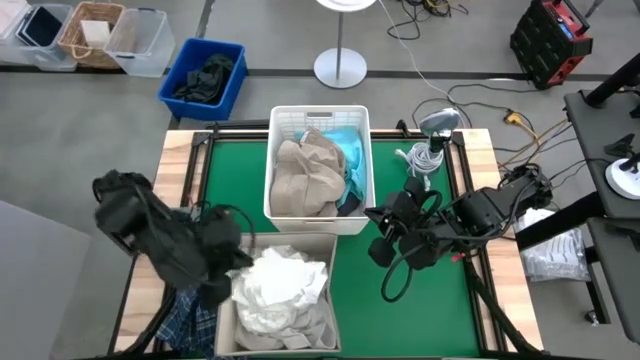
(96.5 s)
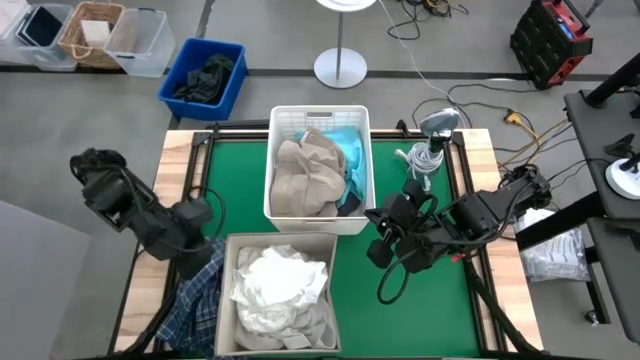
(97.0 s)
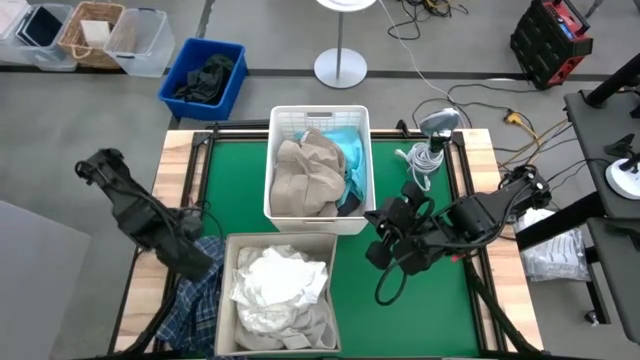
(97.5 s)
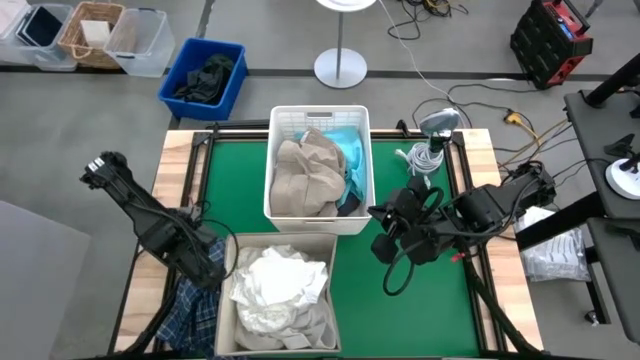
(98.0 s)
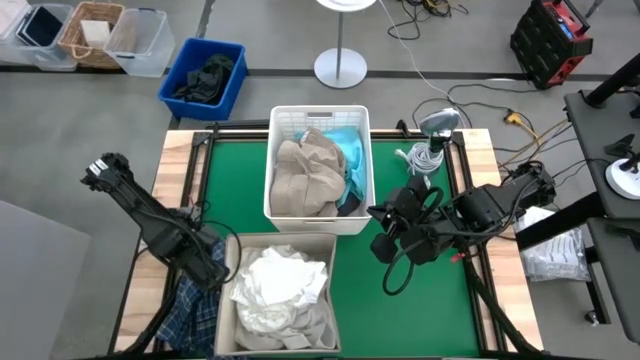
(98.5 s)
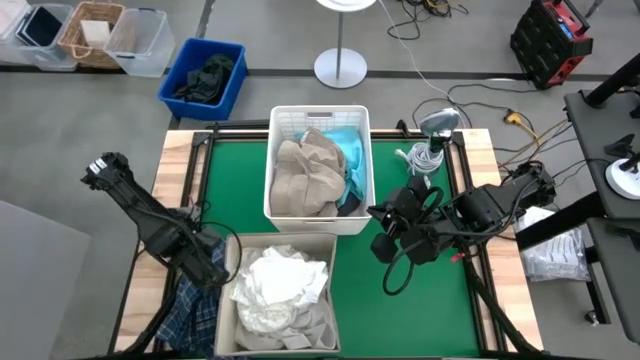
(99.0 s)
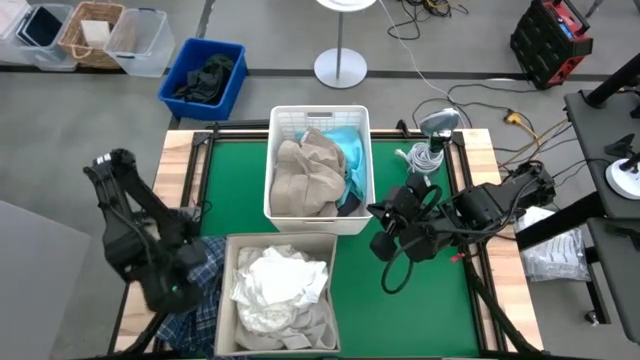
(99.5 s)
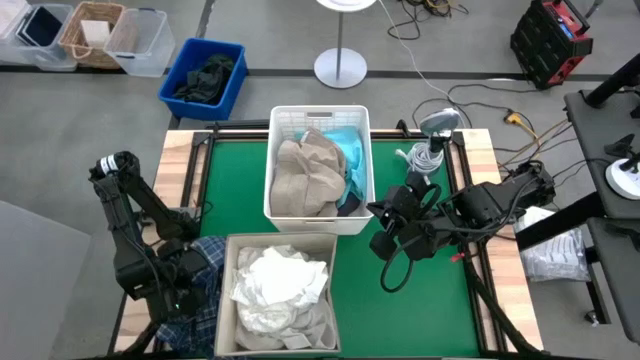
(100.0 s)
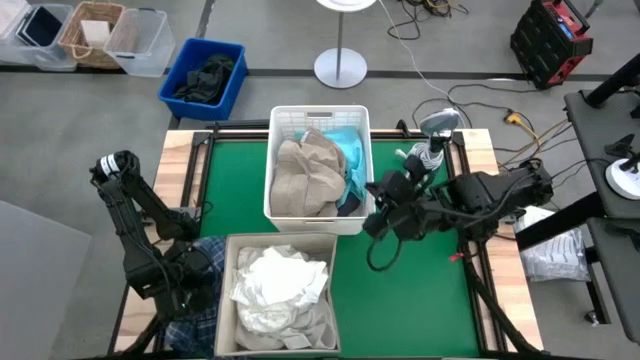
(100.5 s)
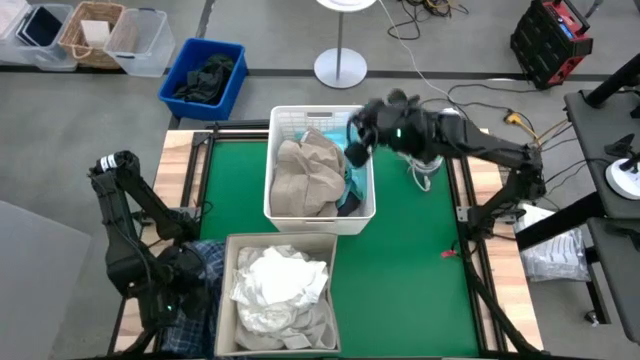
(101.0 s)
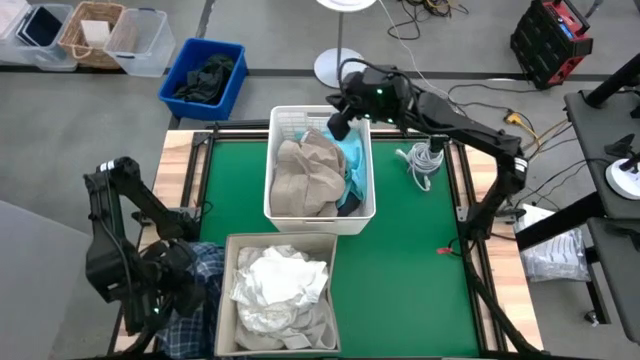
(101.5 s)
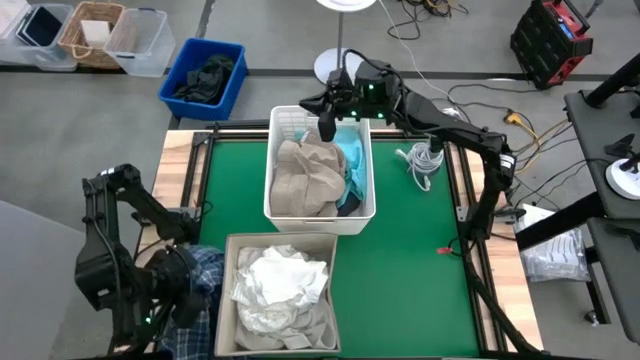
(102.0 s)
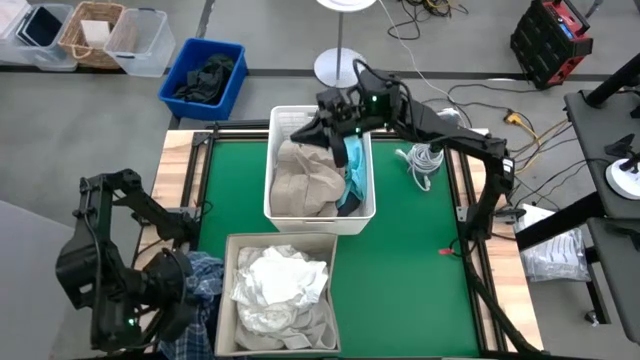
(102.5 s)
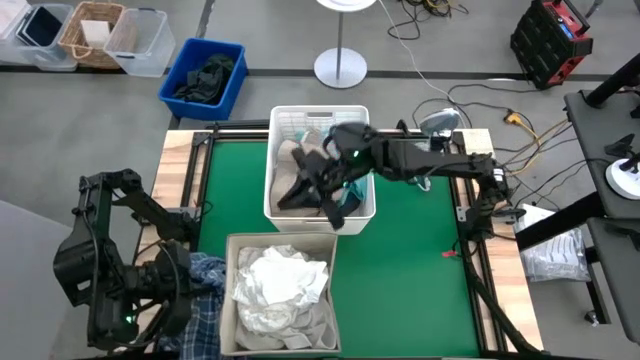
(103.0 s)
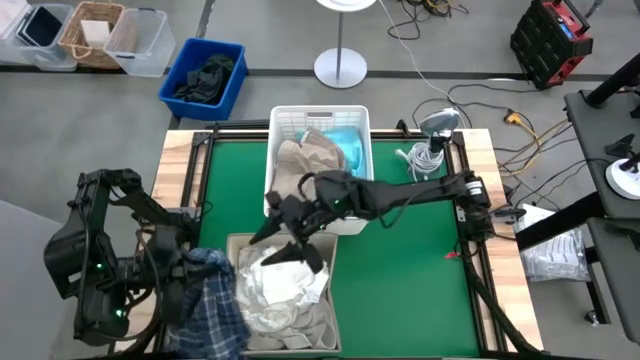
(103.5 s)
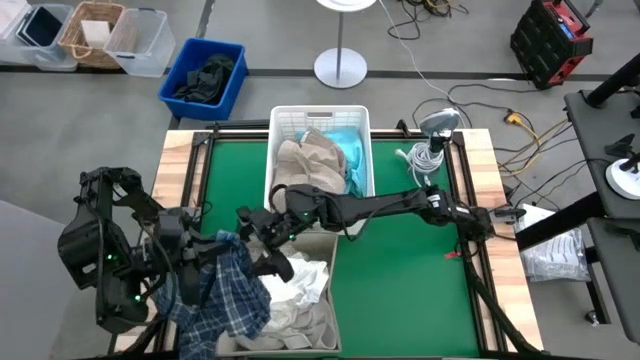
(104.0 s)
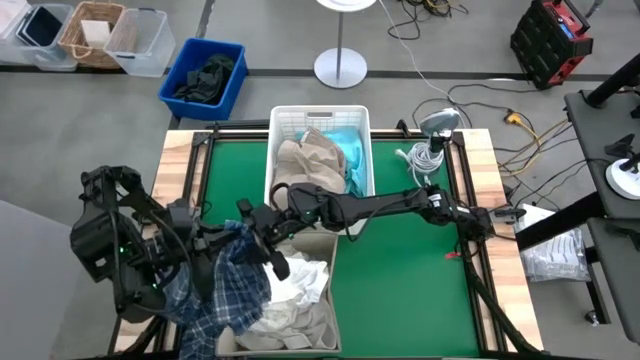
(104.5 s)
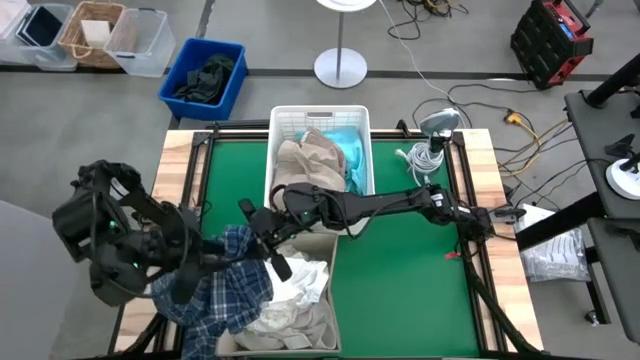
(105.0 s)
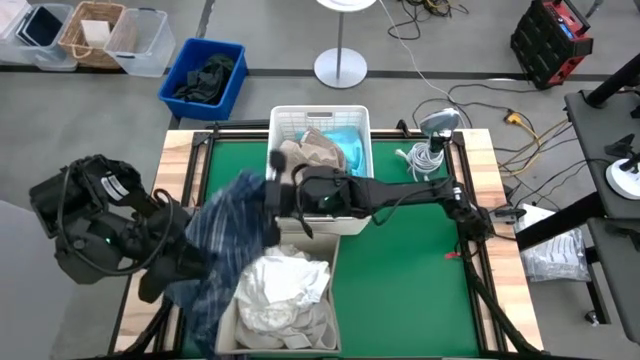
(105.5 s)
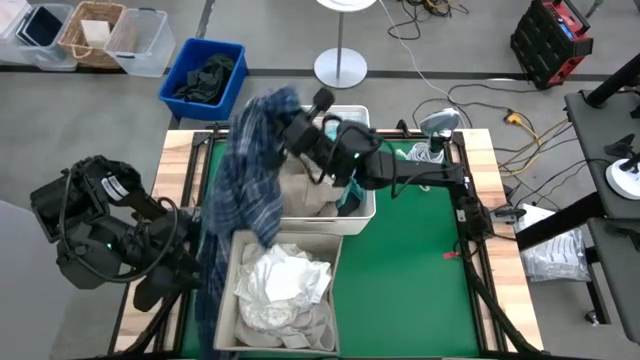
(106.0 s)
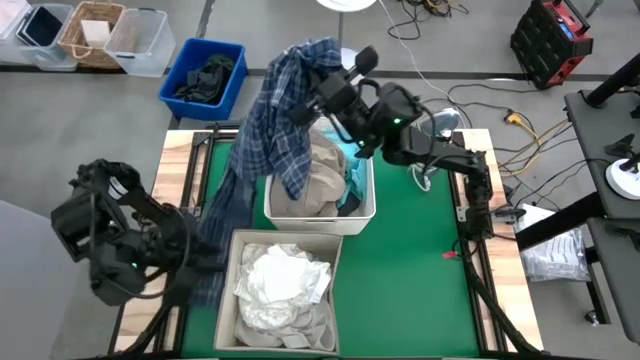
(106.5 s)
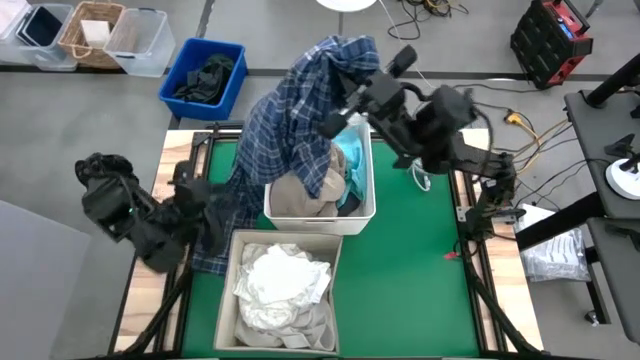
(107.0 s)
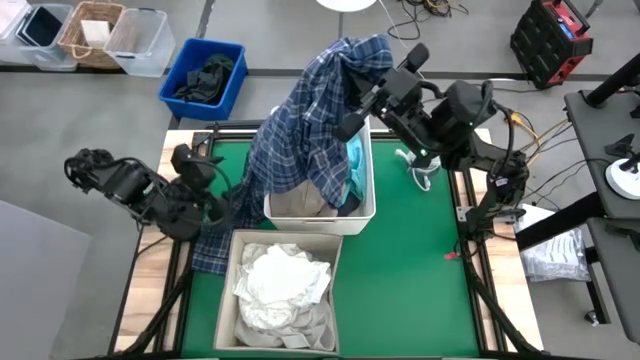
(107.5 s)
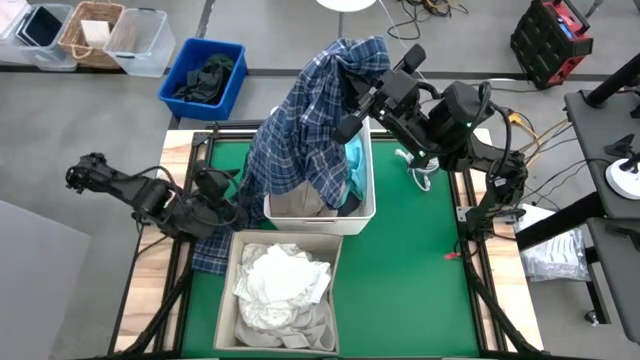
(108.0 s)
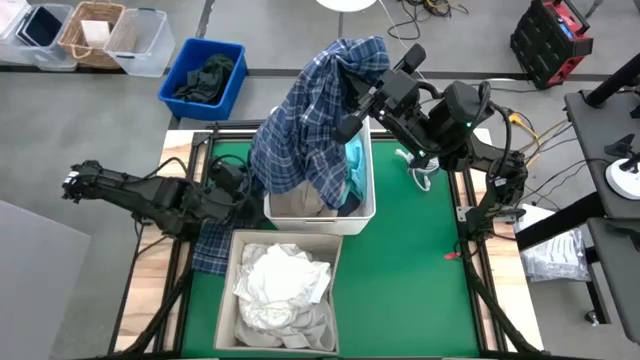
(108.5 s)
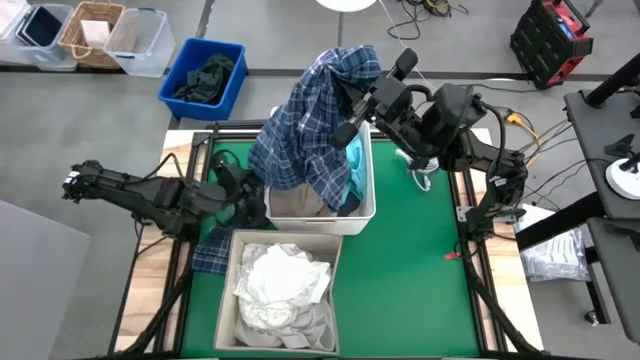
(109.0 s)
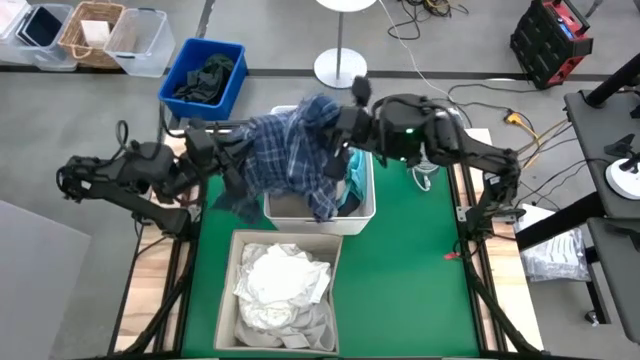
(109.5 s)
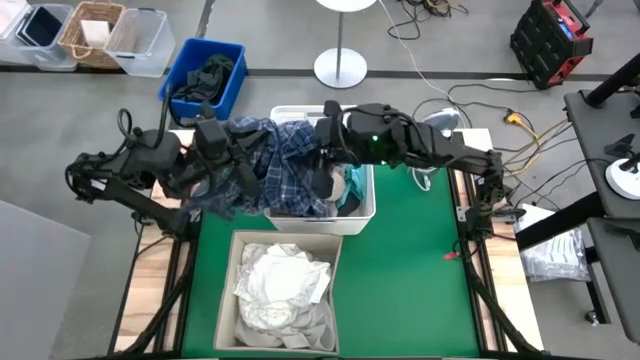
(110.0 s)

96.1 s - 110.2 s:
Task: Sort clothes
Put the blue patterned polo shirt into the white bin

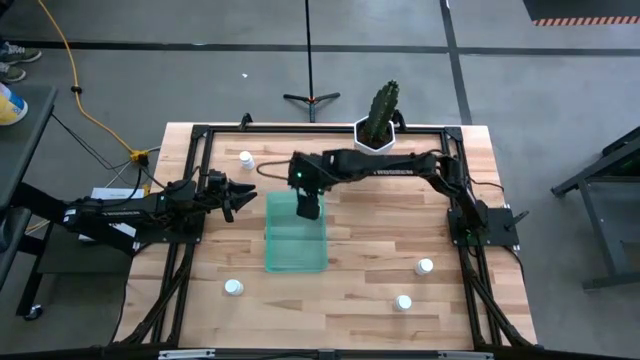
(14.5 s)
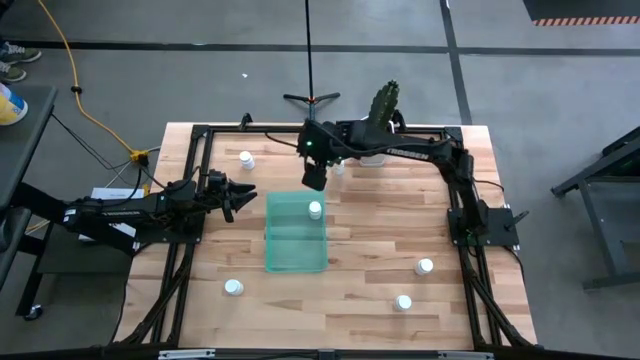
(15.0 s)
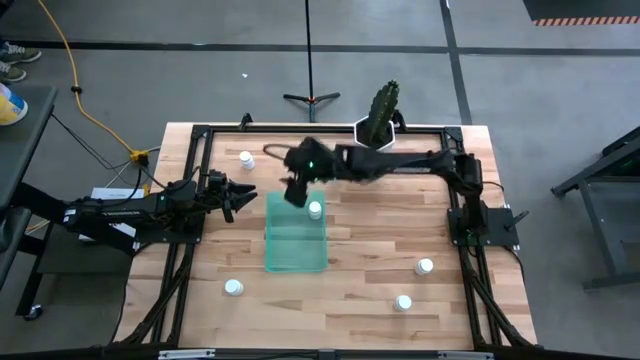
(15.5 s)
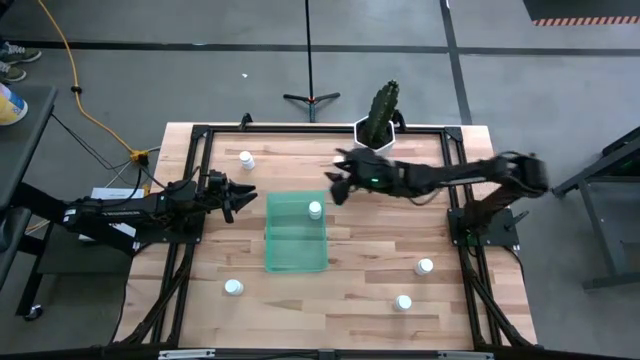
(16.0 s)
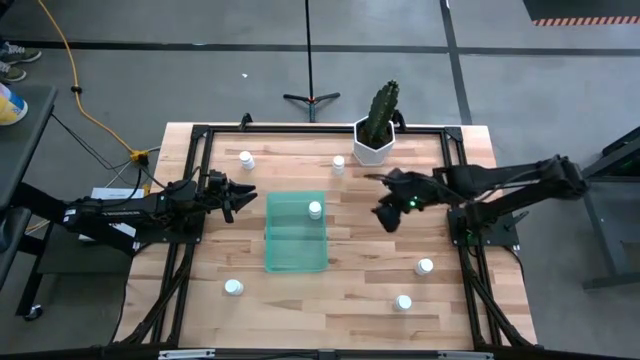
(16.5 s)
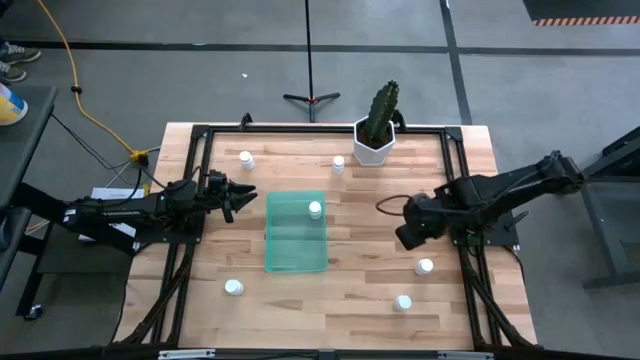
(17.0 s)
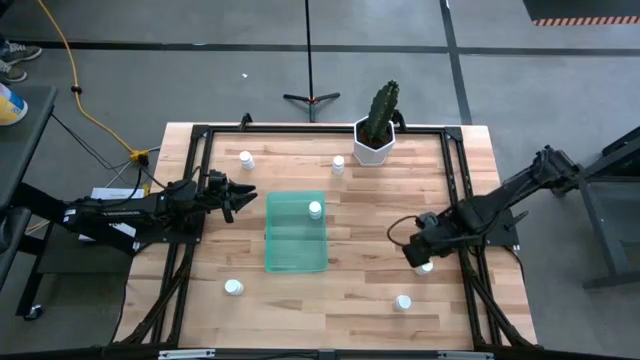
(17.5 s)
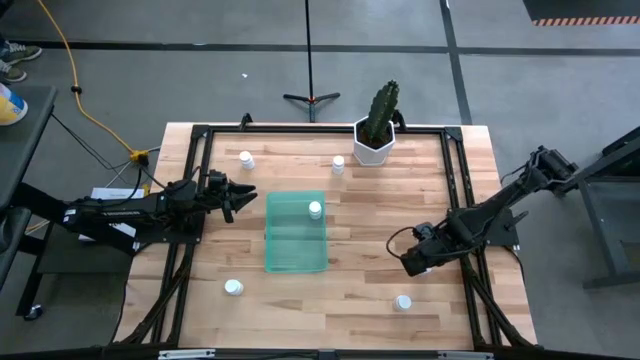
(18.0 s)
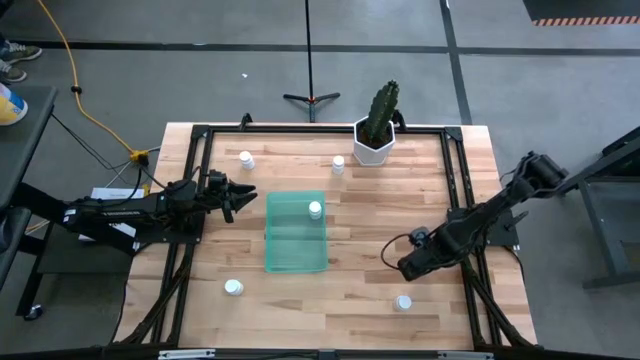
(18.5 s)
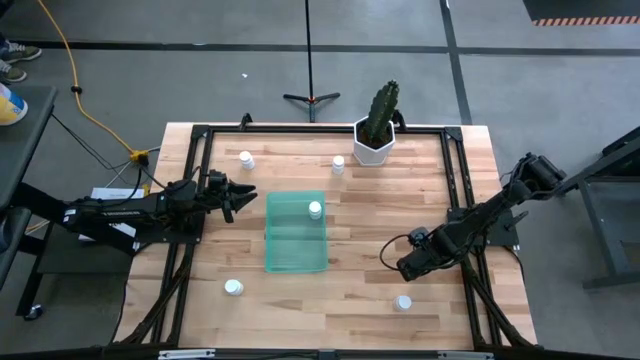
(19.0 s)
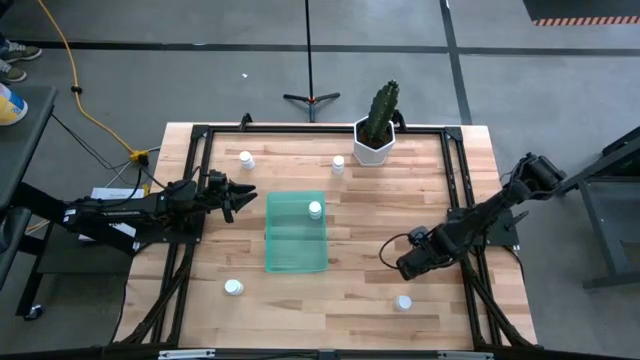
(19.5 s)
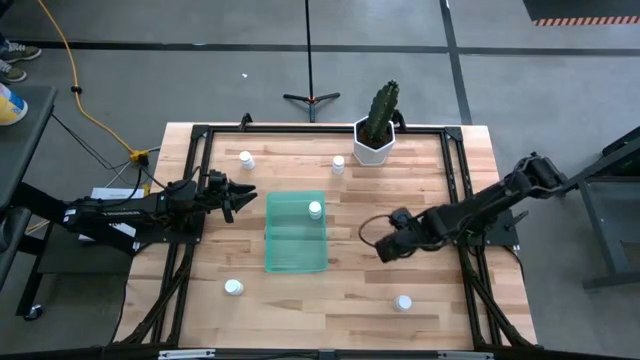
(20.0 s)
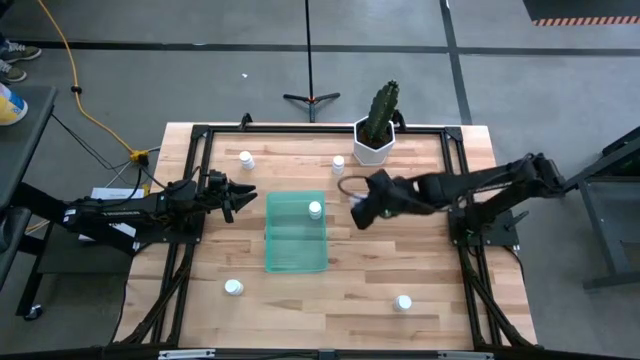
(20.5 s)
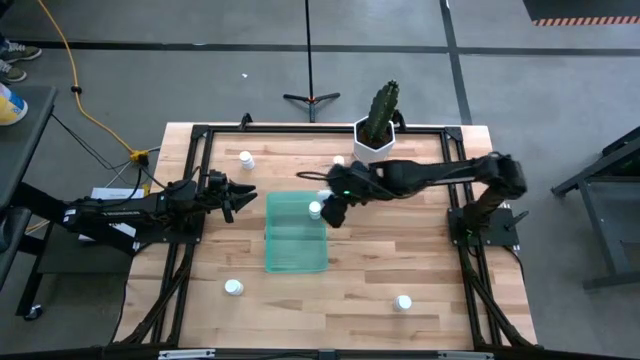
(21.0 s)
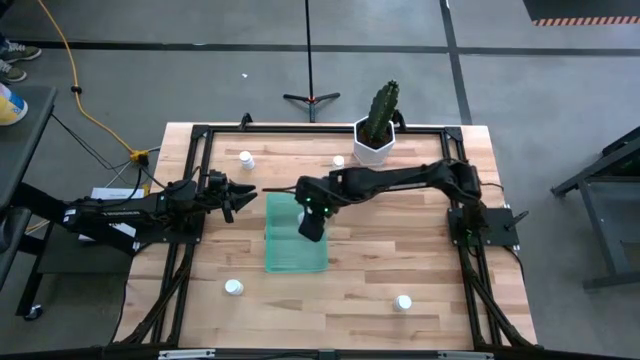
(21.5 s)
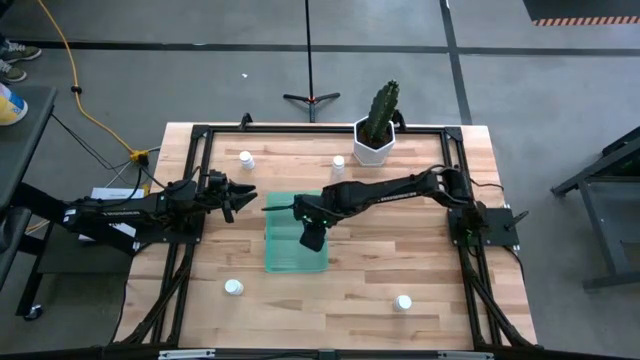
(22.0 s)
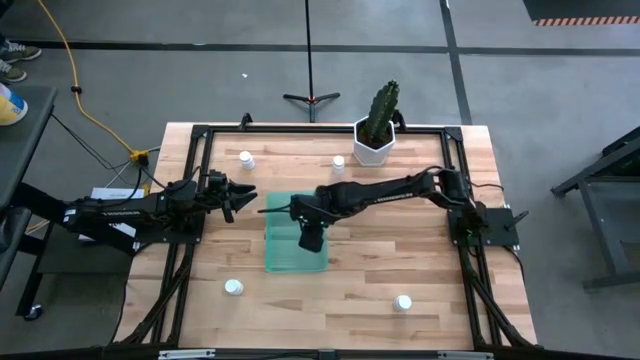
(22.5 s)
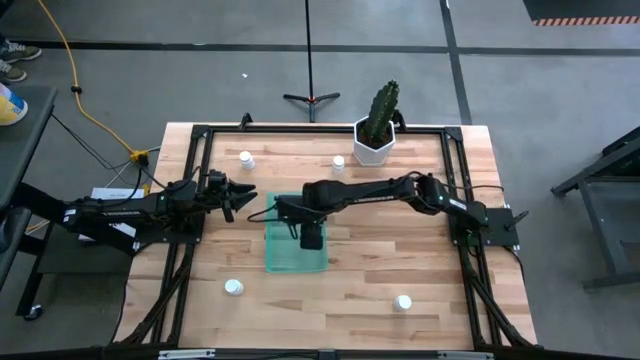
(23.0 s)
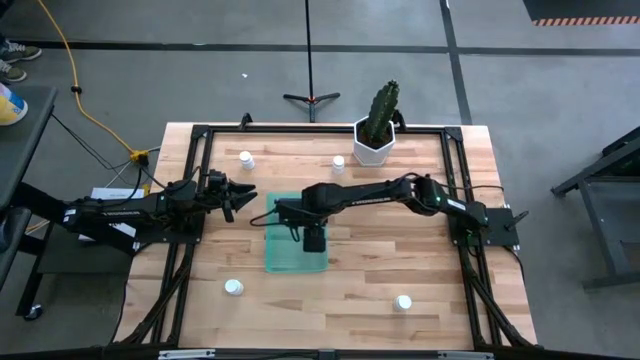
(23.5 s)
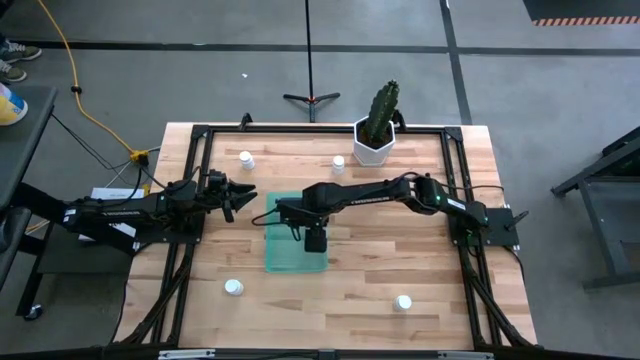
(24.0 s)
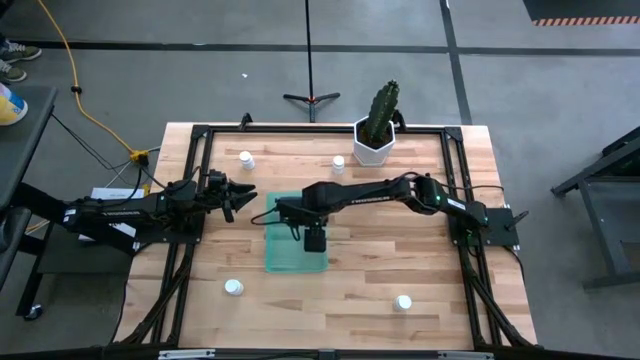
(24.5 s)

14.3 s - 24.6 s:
Task: Pick and place pill bottles into a basket
Put the pill bottle into the blue bin
